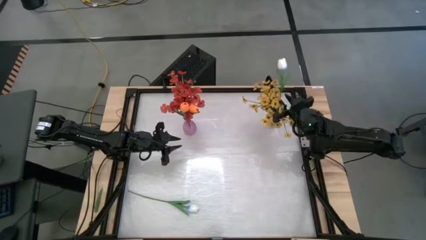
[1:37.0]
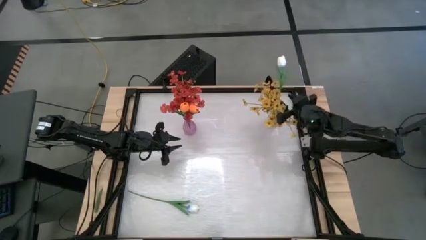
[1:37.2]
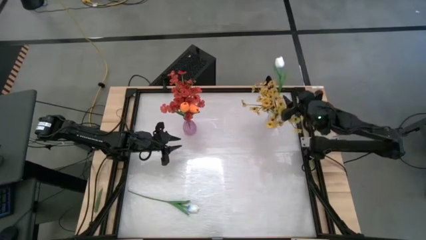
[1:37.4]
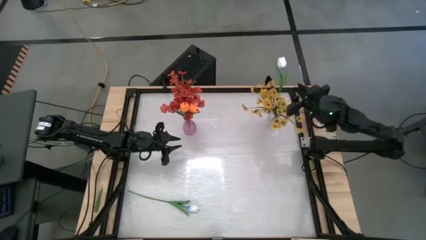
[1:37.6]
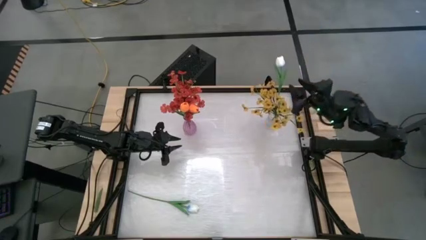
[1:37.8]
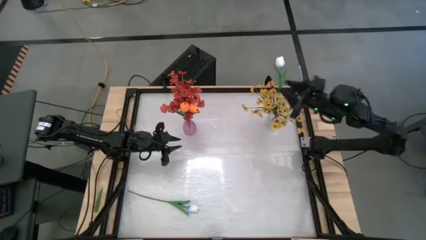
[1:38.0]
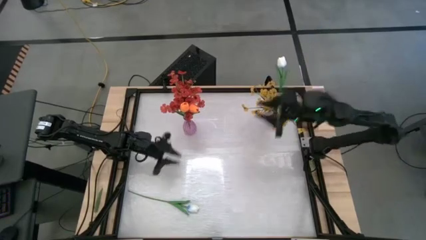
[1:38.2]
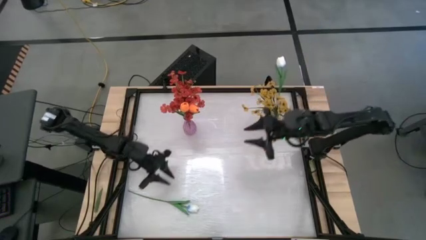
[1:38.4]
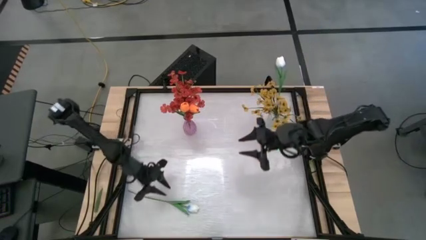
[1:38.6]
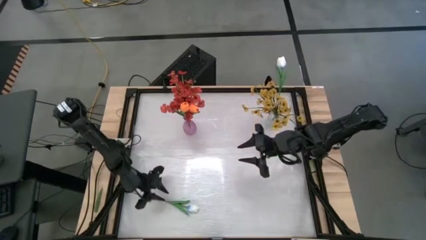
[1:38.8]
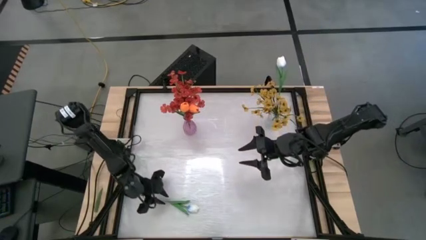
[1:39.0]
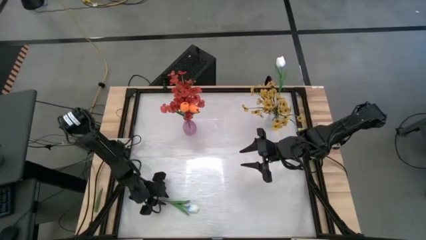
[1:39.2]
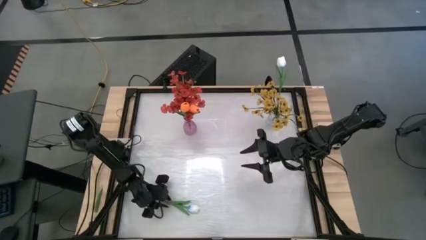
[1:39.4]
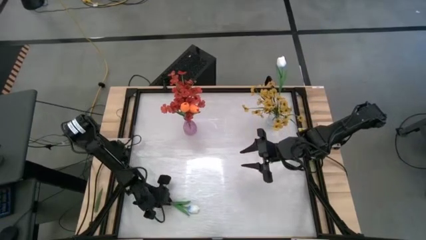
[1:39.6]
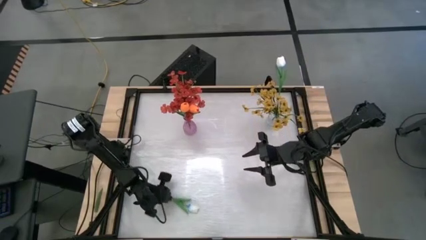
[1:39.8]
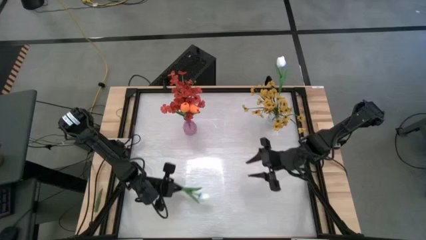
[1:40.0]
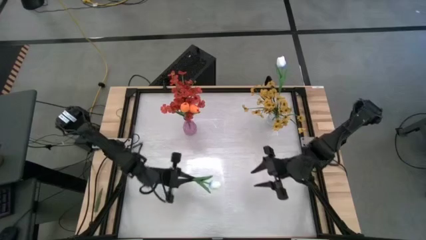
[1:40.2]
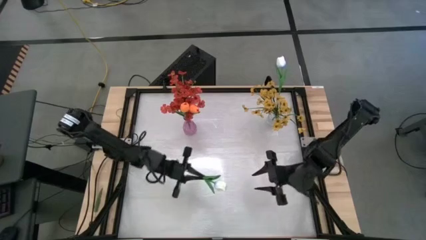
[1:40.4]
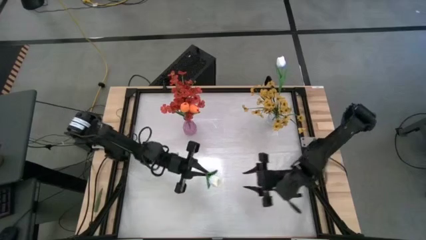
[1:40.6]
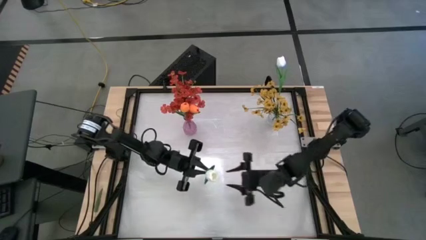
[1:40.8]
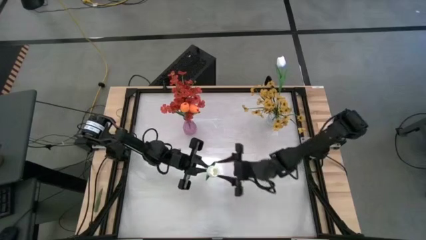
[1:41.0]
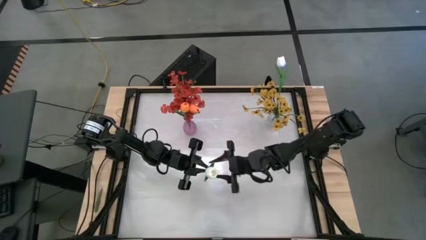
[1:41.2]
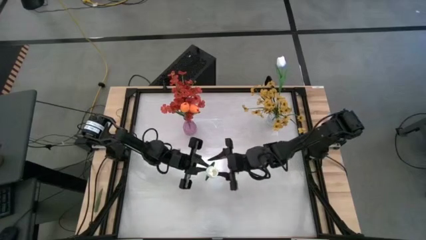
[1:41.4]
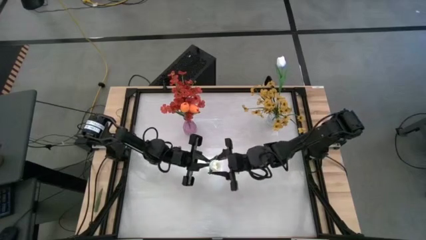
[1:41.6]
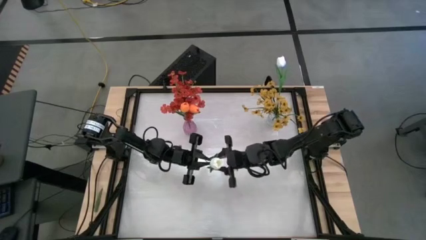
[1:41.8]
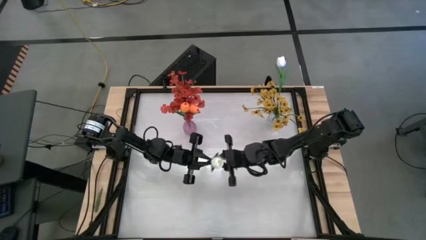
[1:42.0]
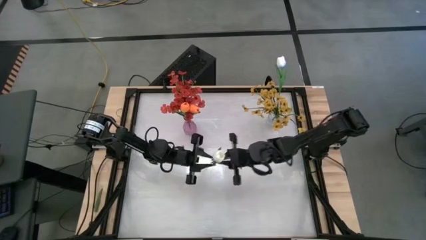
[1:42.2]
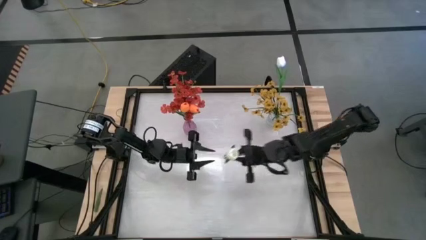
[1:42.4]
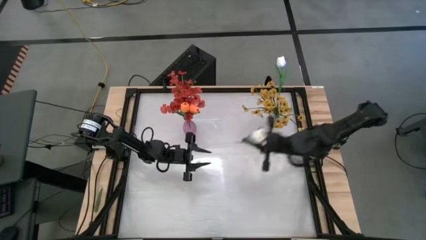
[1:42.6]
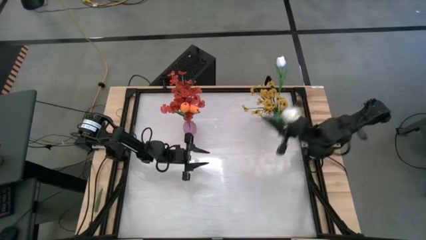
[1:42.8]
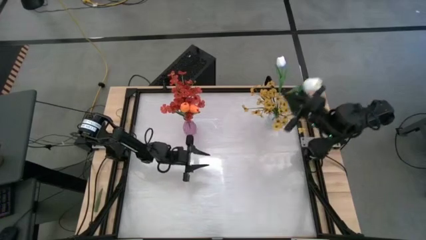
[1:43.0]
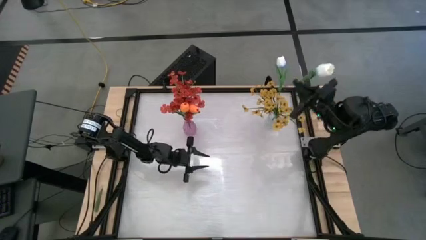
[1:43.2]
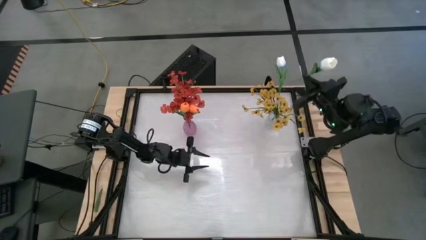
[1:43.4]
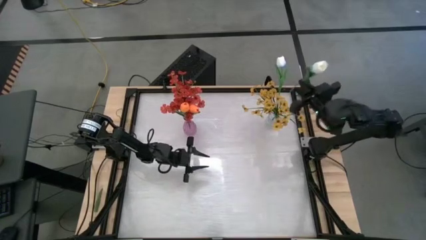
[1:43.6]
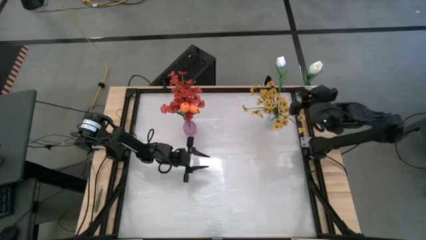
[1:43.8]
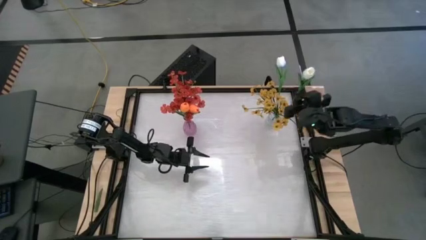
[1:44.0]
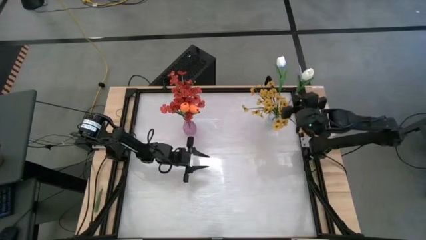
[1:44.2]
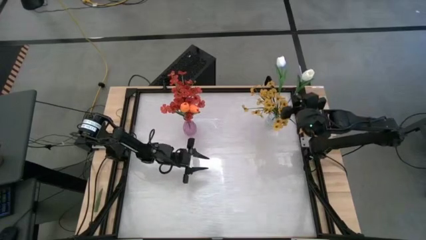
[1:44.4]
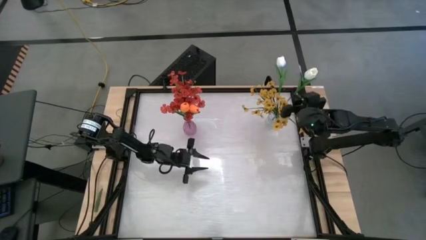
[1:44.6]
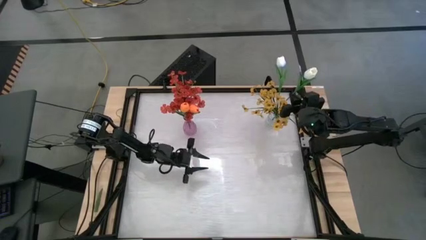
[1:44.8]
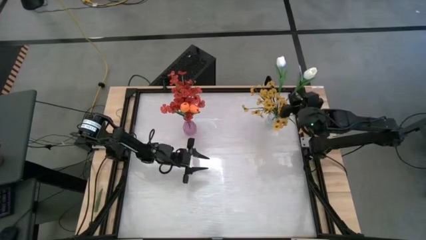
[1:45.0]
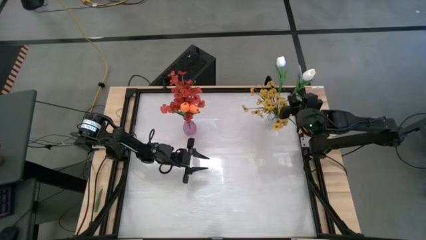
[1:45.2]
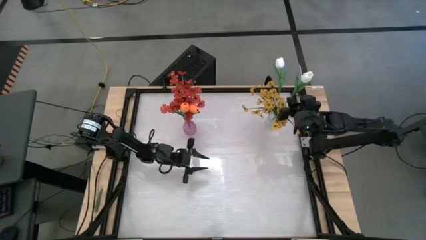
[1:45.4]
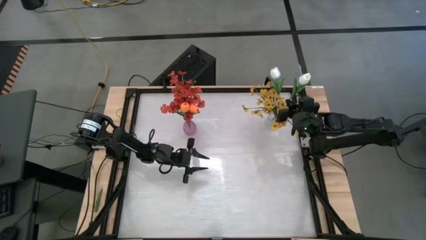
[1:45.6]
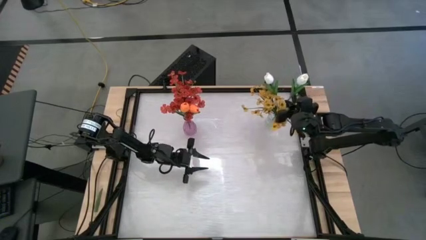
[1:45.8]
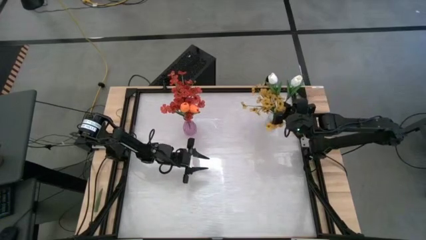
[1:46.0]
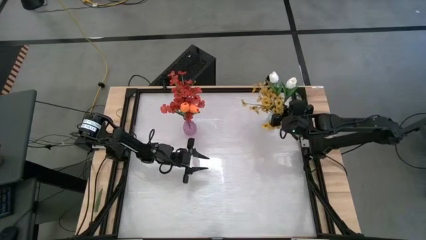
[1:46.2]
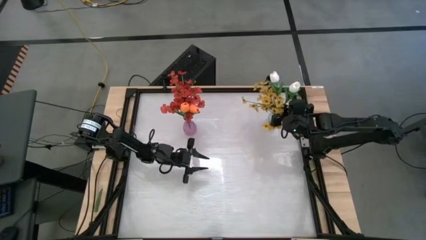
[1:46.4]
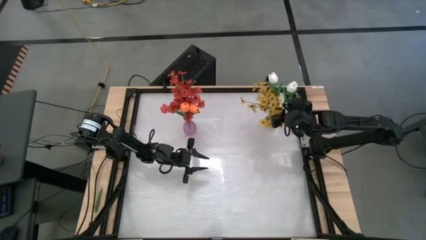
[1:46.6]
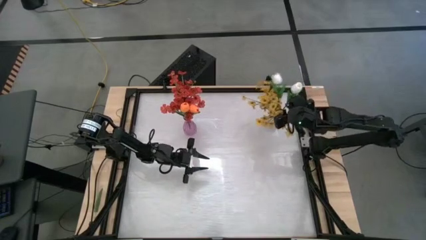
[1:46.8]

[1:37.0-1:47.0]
Task: Sort flowers into vase by color
Put the white tulip into the transparent vase

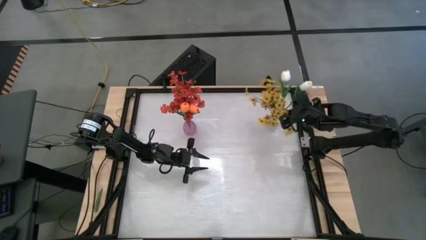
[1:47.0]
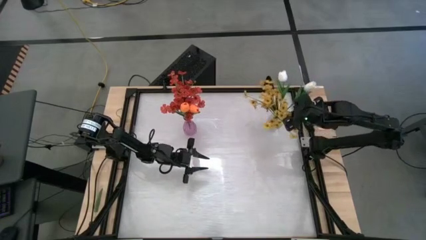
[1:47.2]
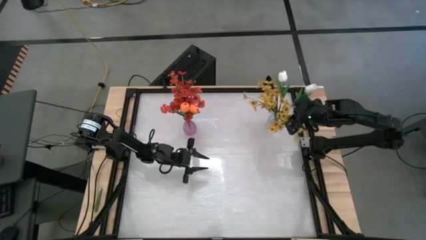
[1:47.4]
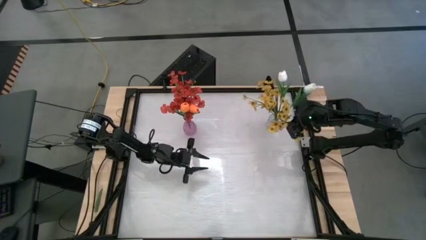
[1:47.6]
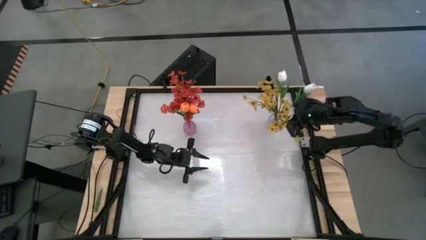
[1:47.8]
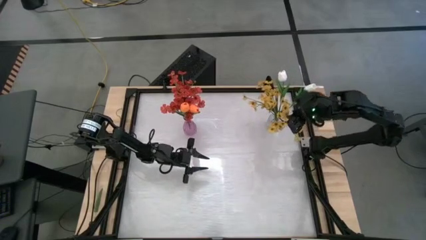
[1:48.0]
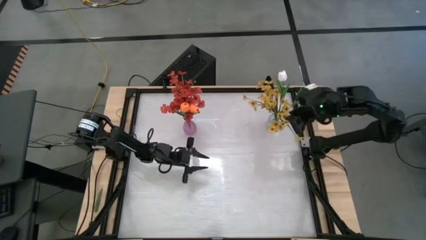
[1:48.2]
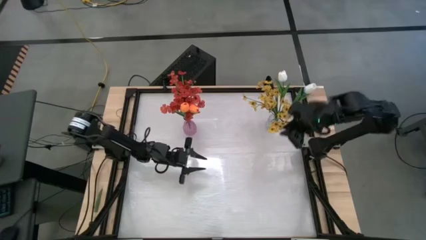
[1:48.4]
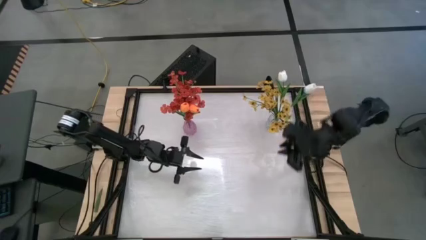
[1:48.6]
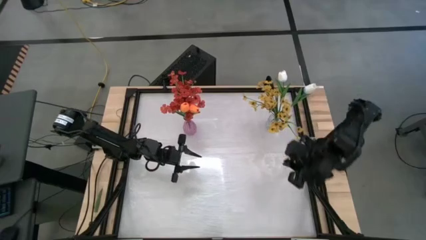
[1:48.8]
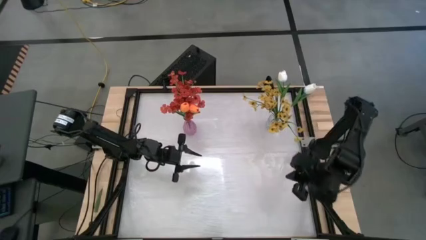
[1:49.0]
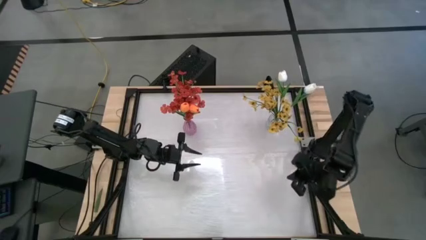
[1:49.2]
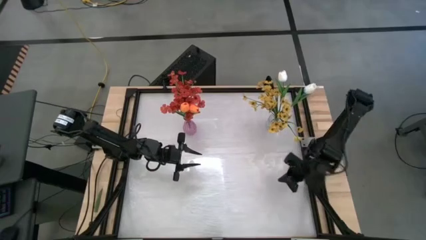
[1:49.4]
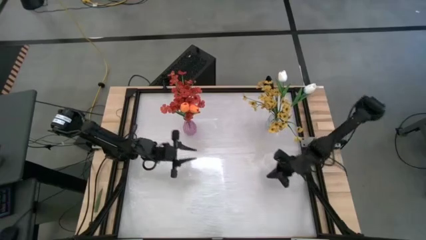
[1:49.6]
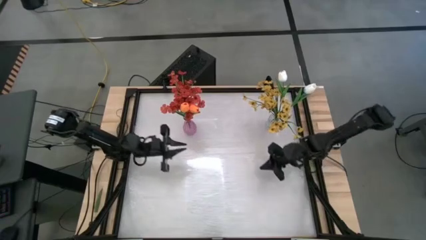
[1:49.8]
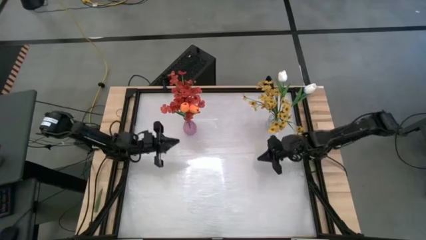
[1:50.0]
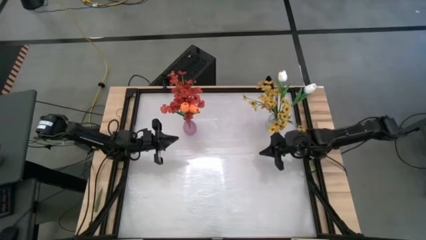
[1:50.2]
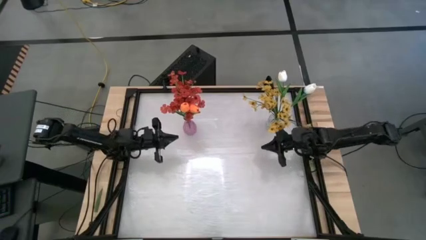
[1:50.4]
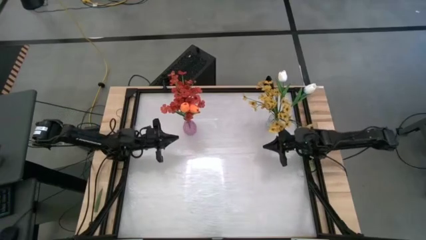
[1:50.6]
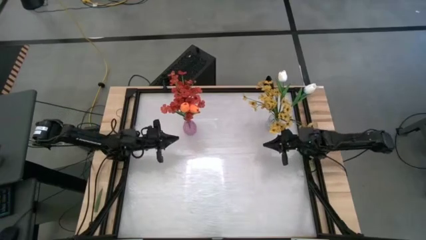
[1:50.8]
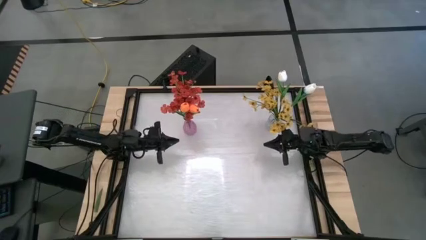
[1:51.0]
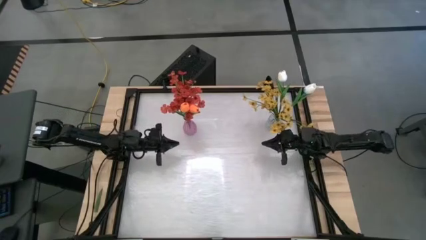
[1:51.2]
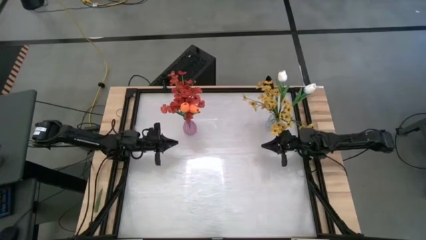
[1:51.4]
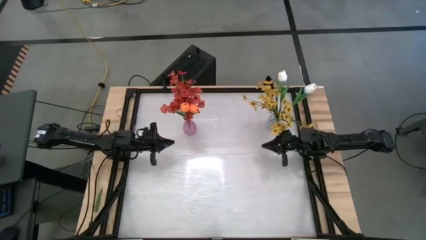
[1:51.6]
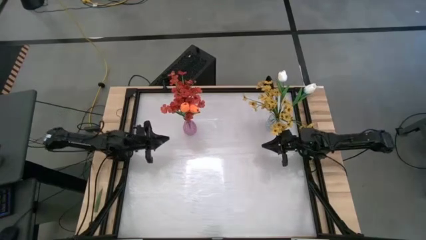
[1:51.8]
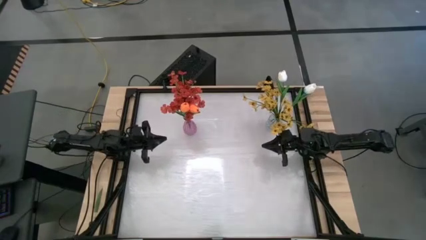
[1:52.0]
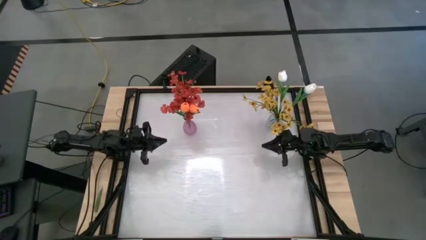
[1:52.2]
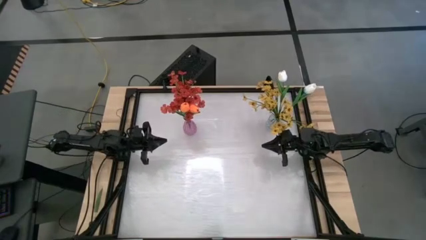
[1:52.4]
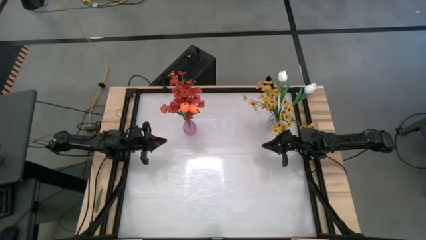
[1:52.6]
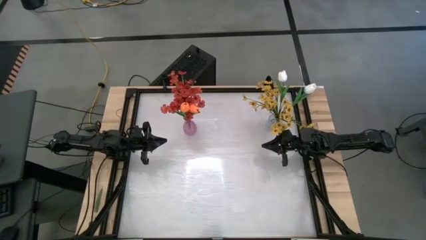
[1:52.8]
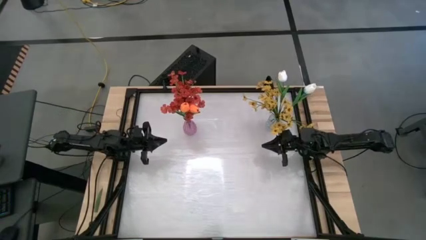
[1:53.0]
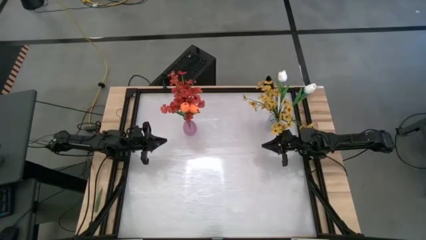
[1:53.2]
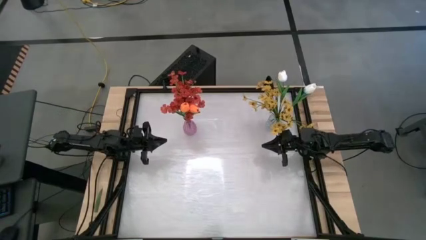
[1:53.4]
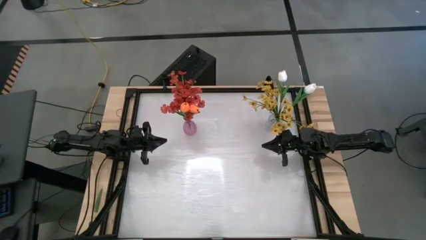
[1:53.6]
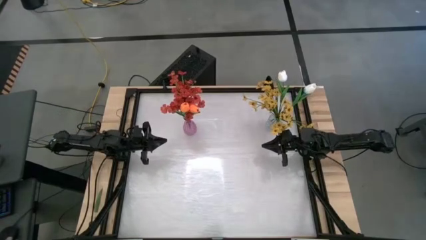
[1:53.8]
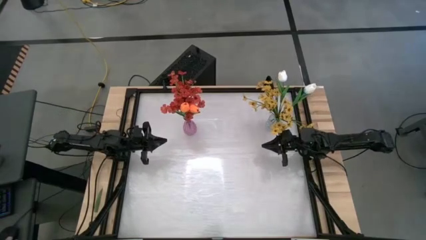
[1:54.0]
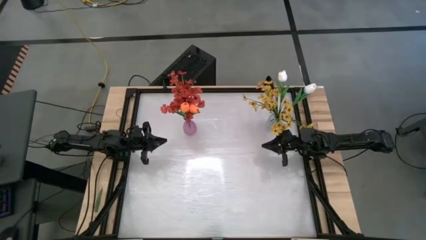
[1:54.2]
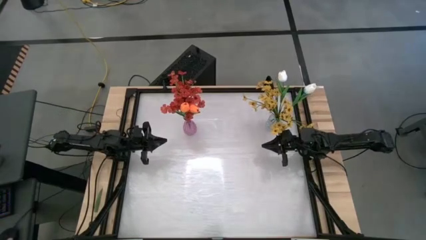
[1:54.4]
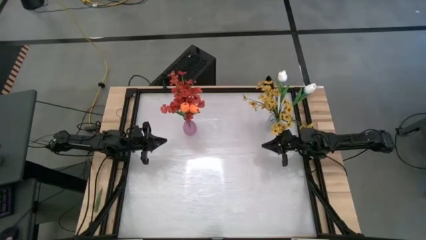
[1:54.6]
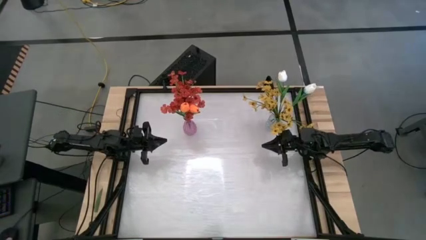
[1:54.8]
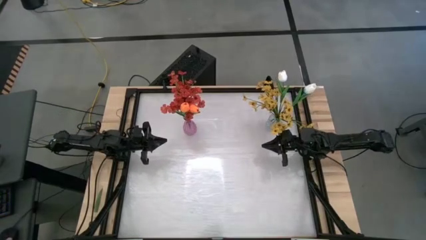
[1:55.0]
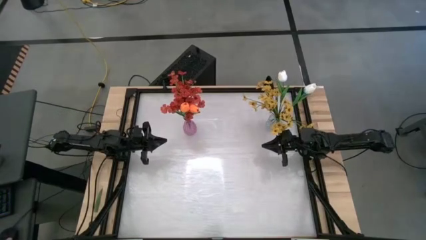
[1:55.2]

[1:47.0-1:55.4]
Return to Home Position
